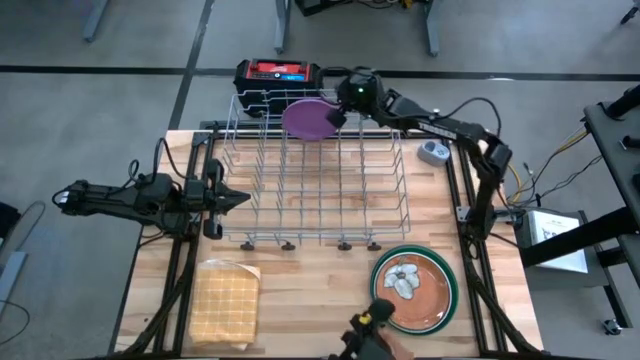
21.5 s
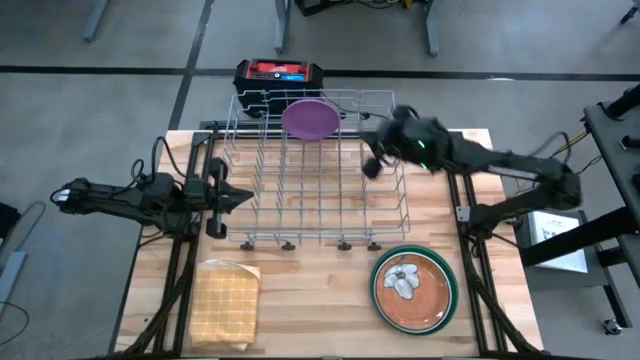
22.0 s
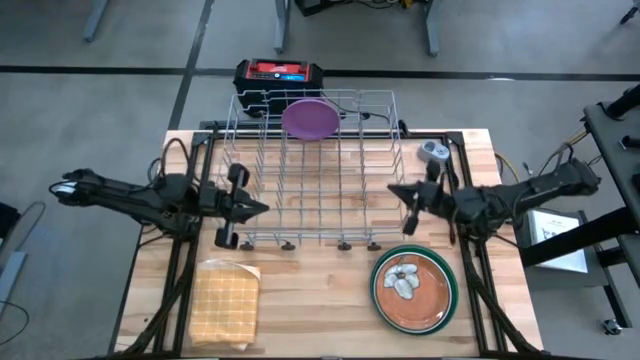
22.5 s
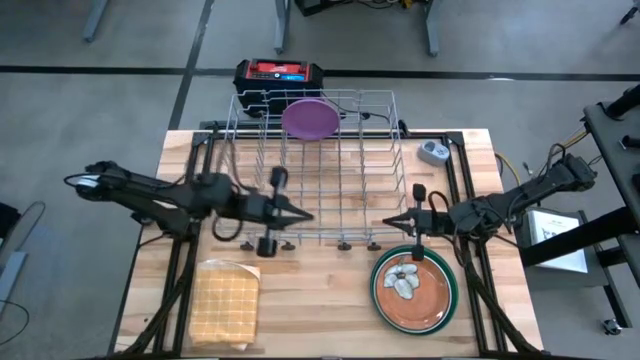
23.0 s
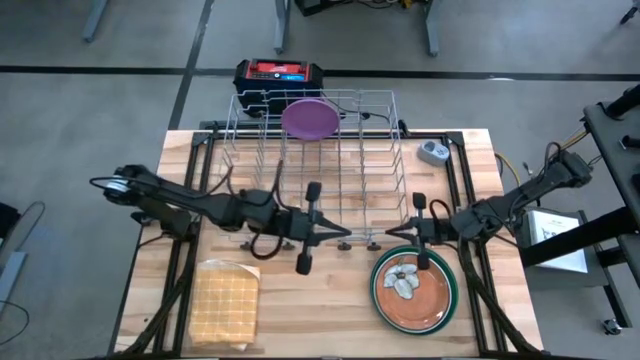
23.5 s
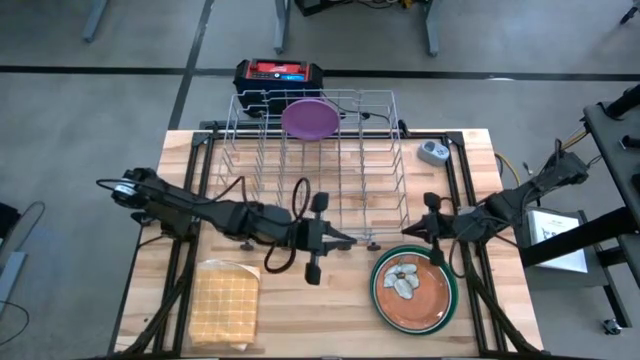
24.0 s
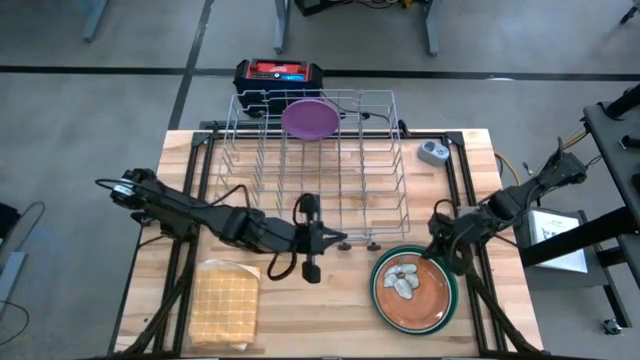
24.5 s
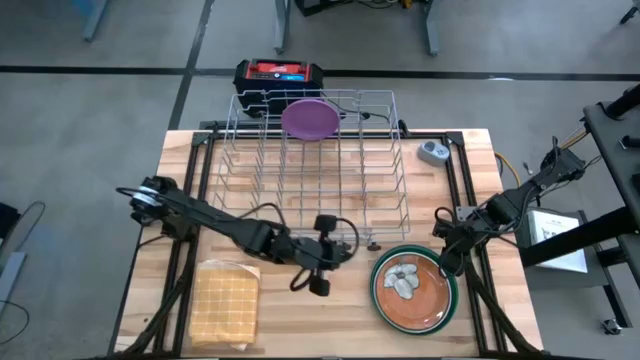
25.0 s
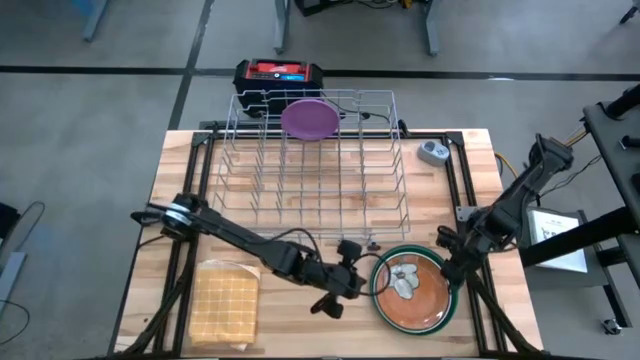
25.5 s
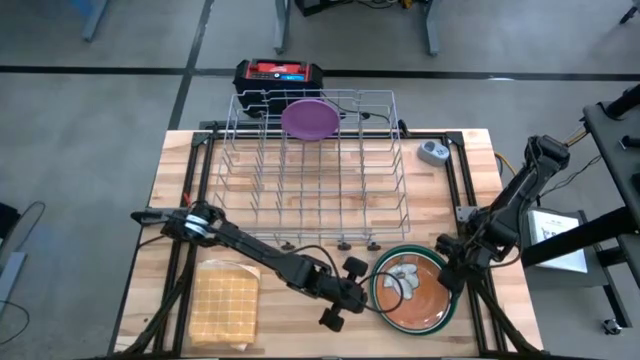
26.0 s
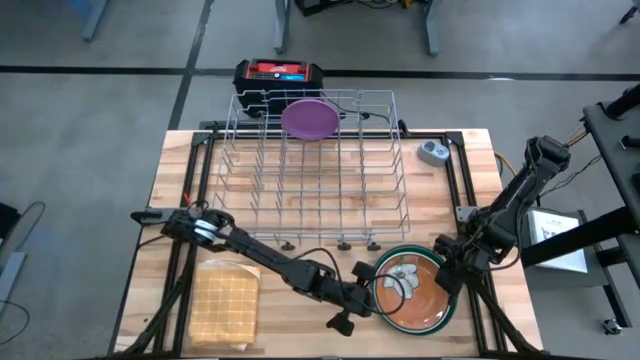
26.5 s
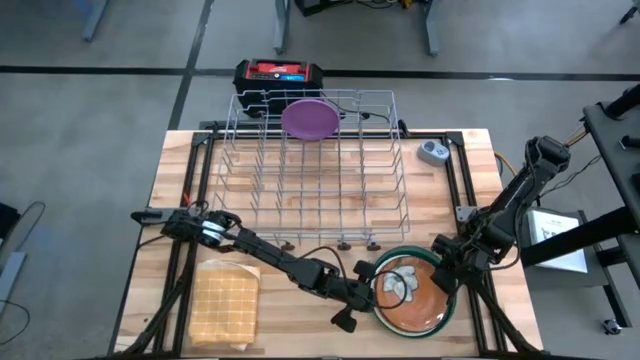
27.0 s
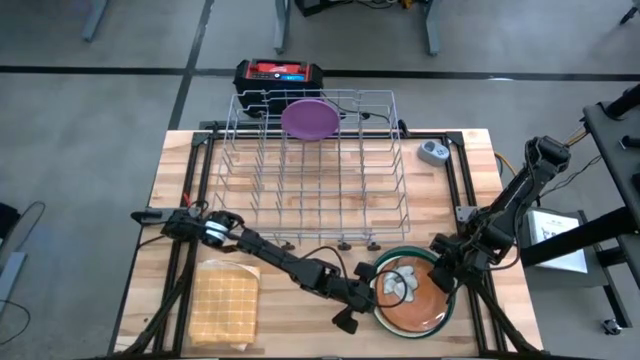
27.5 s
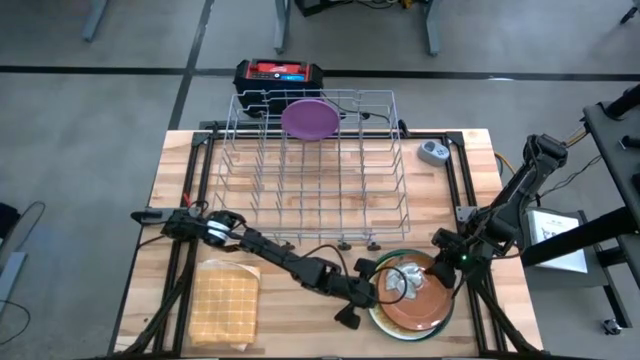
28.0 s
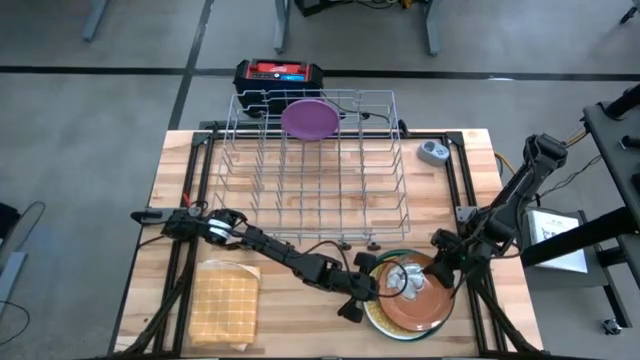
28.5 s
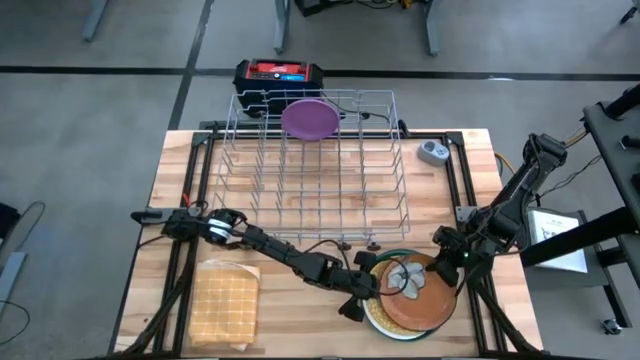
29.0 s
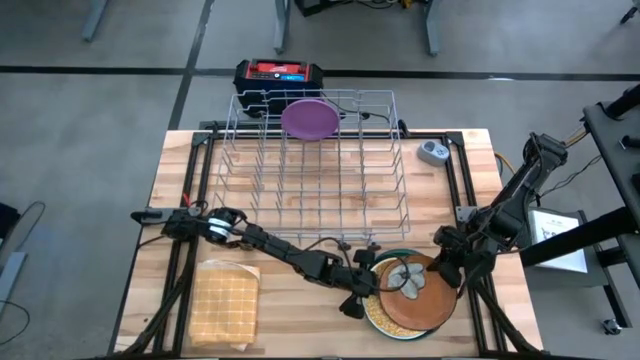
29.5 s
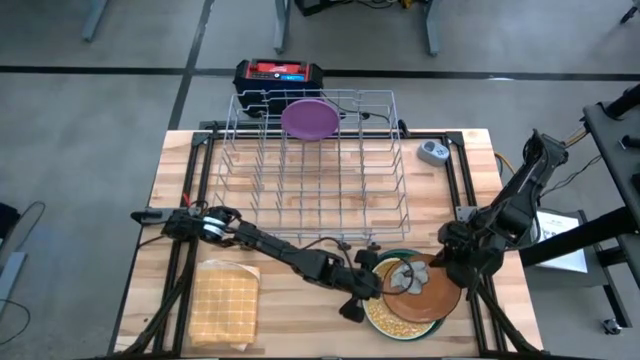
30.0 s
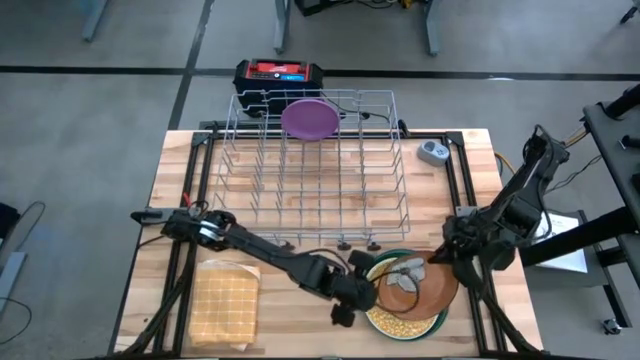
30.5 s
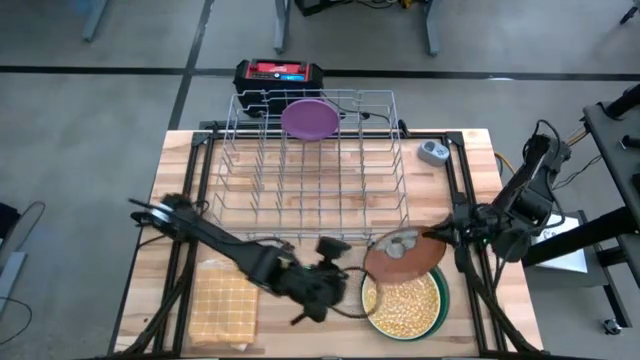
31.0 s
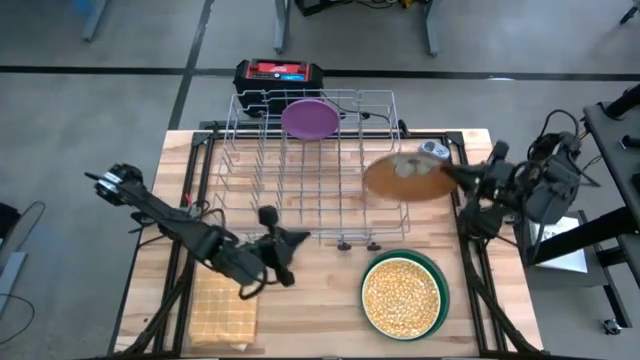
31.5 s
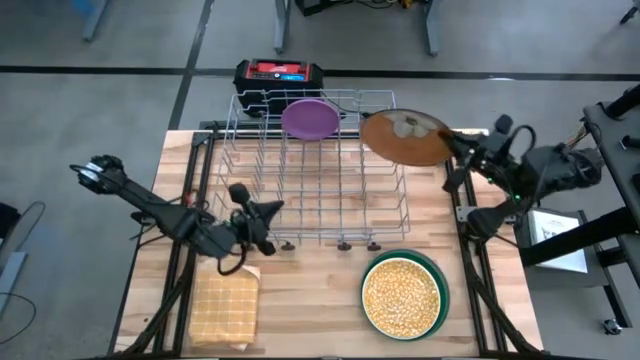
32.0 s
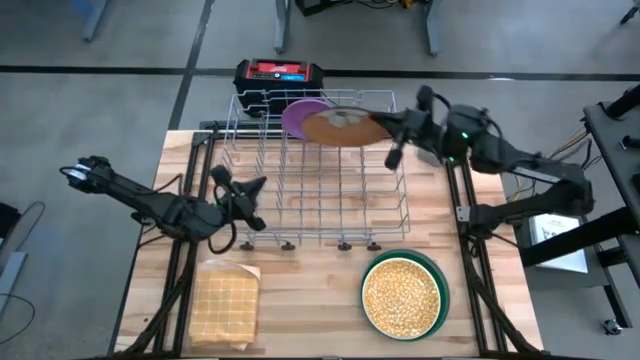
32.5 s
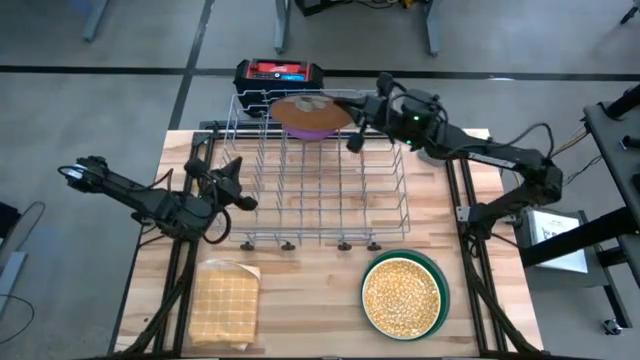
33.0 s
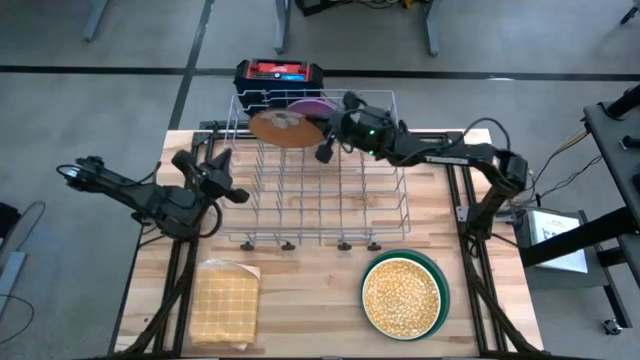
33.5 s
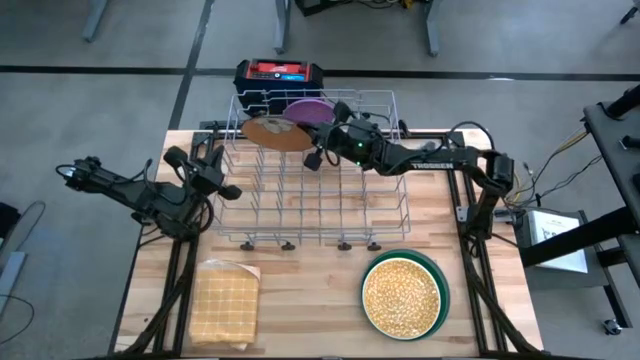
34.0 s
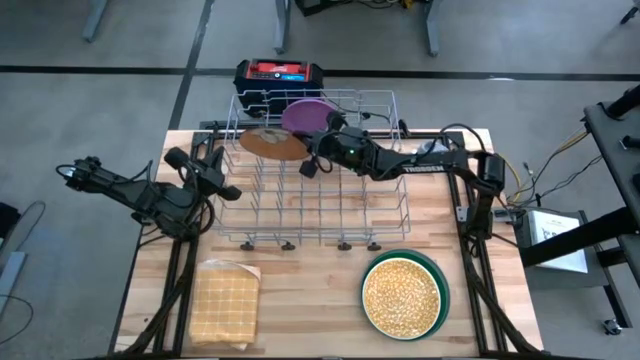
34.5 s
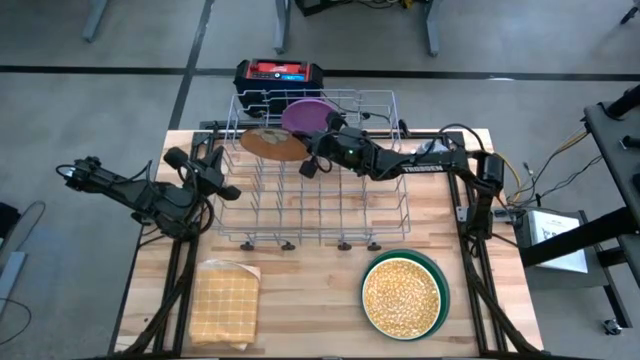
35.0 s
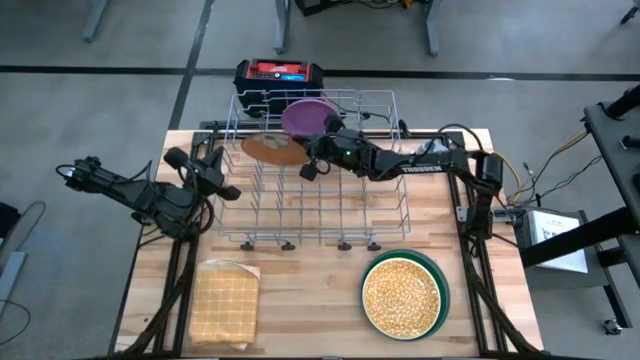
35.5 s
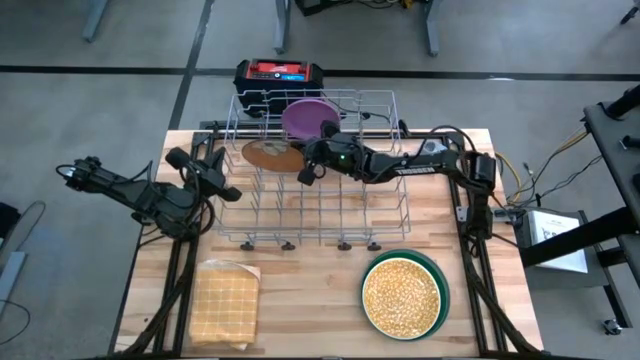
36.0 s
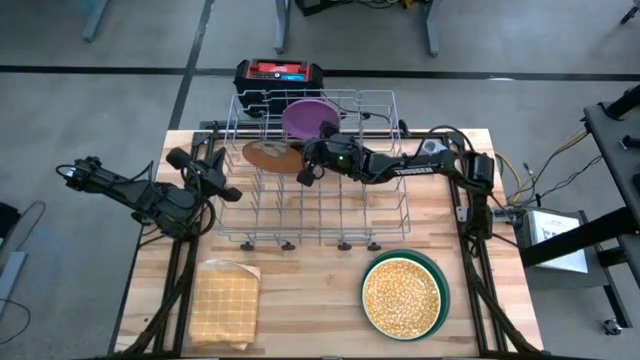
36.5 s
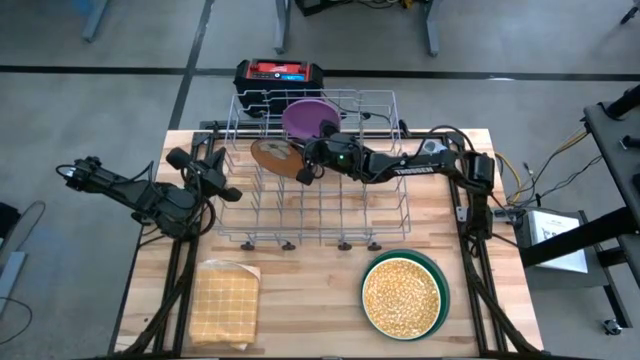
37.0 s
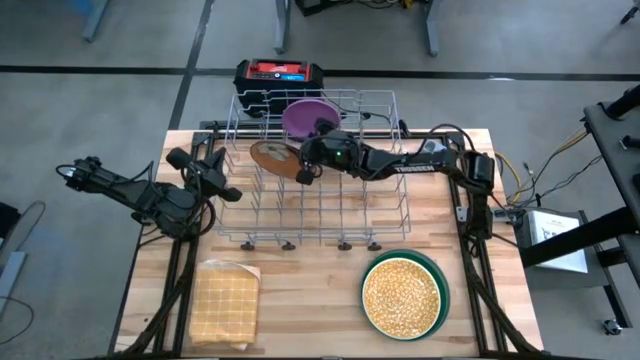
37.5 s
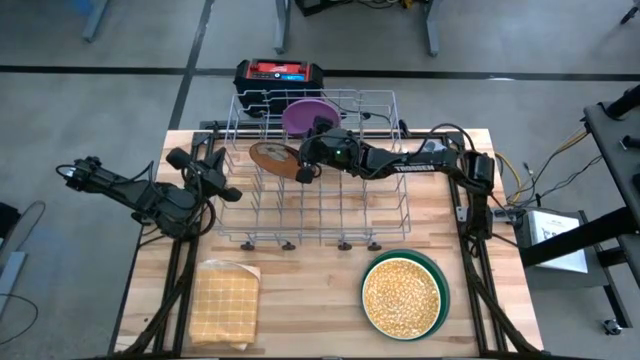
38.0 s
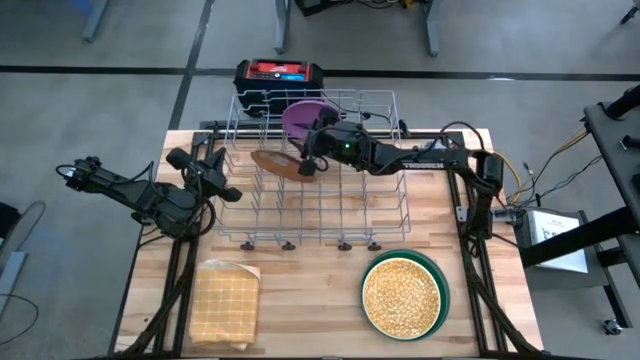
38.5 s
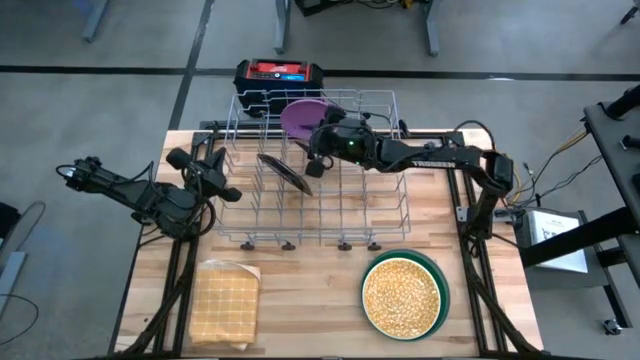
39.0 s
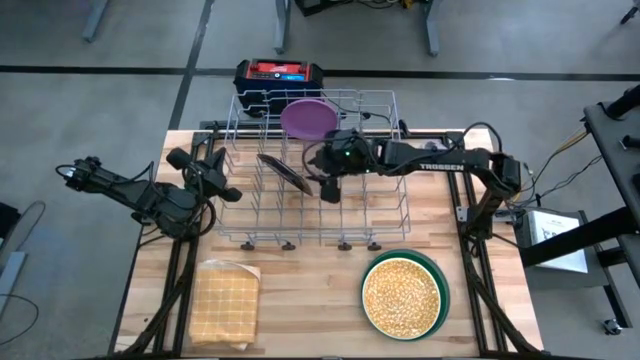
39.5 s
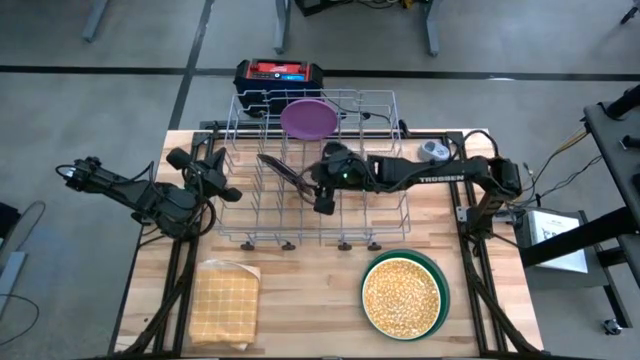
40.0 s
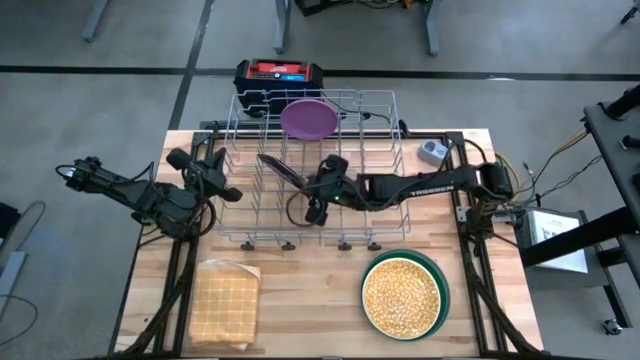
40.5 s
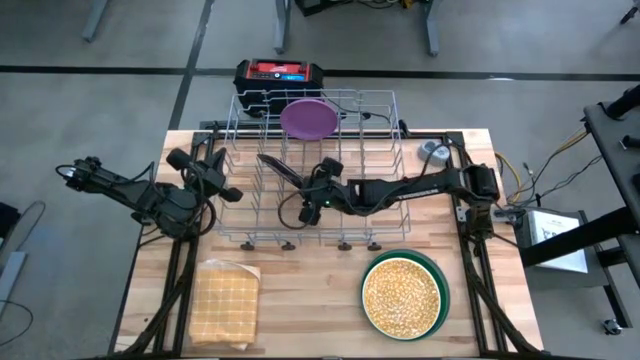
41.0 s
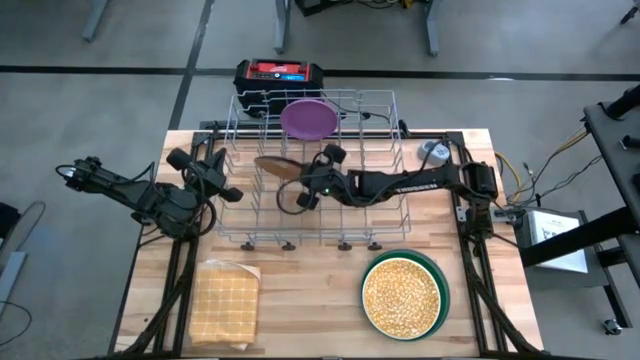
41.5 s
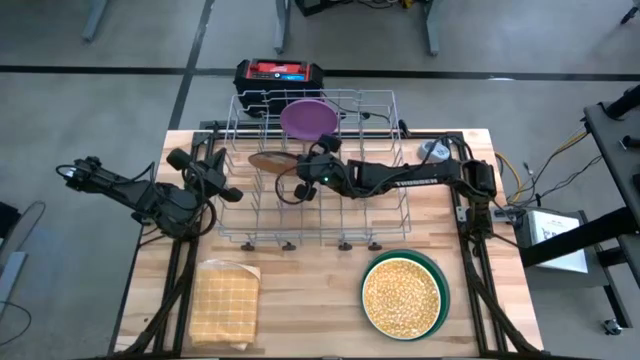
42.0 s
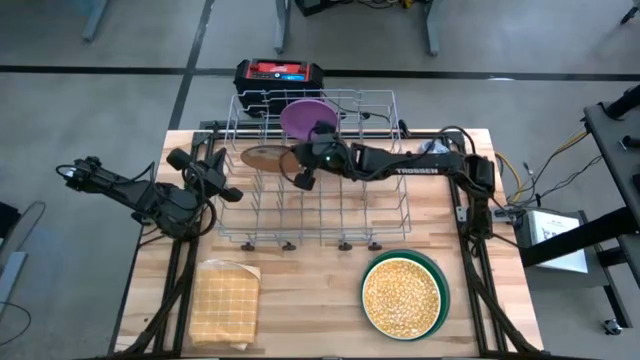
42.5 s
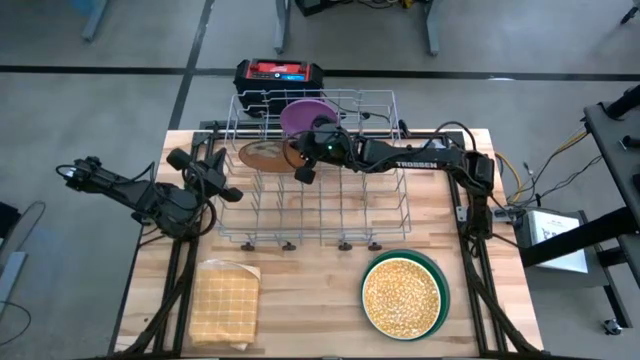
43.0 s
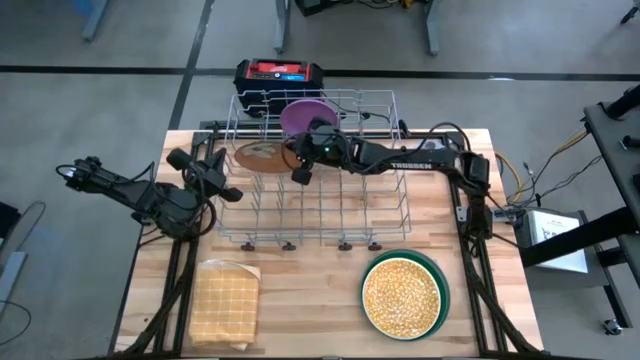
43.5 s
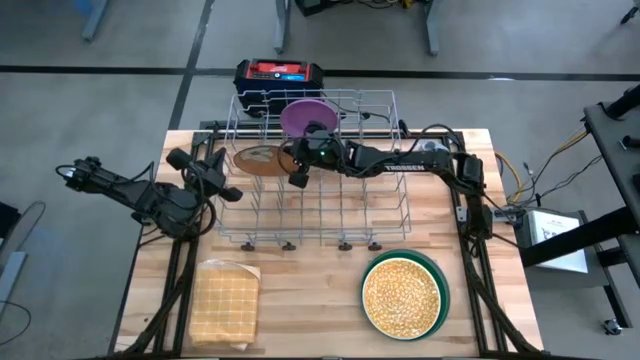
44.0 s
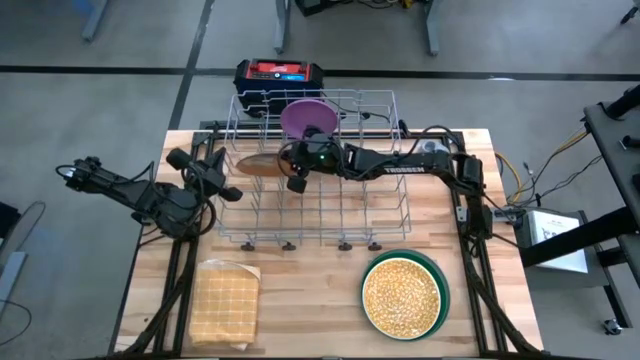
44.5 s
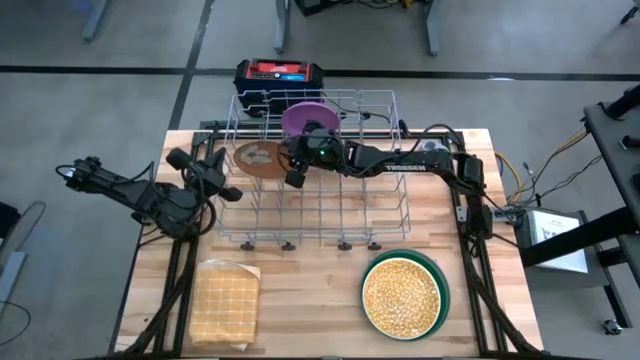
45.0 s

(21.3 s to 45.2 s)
Task: Sort dishes
Put the orange plate into the dish rack
